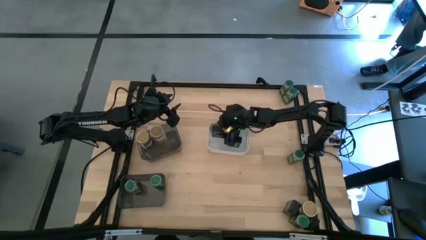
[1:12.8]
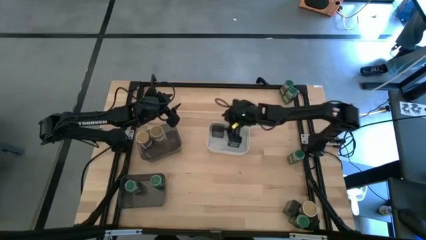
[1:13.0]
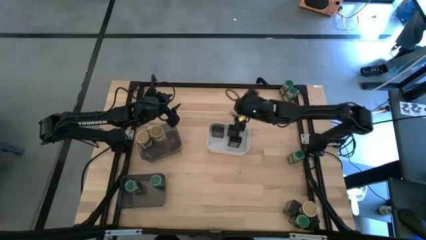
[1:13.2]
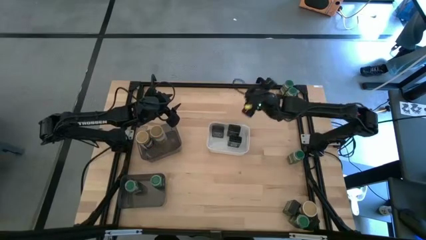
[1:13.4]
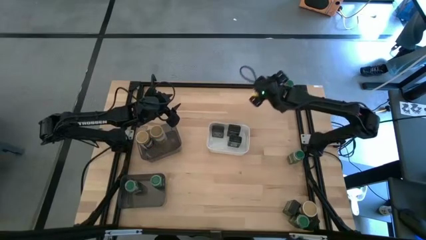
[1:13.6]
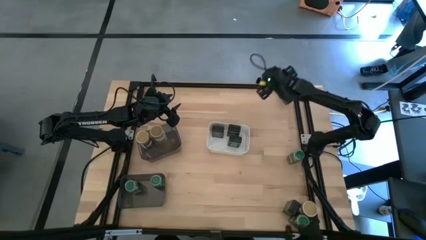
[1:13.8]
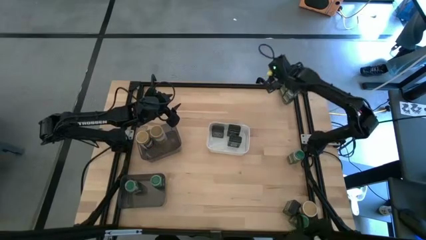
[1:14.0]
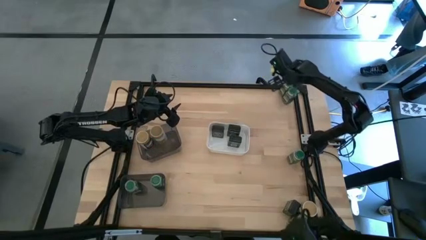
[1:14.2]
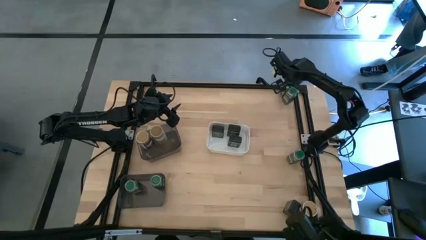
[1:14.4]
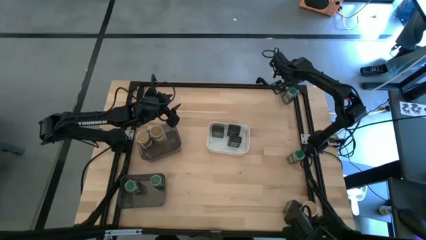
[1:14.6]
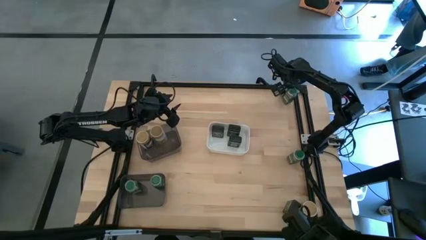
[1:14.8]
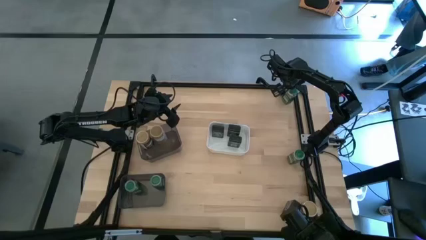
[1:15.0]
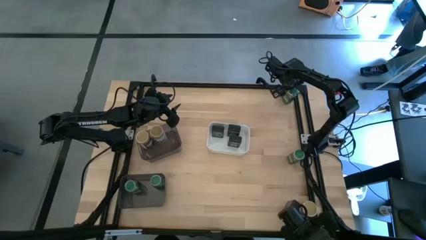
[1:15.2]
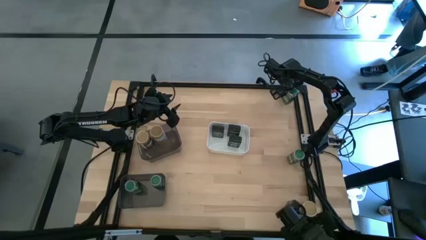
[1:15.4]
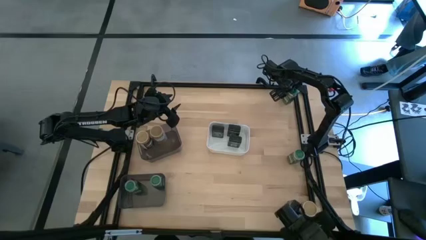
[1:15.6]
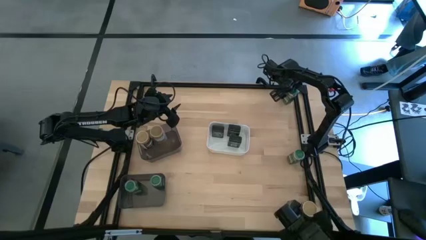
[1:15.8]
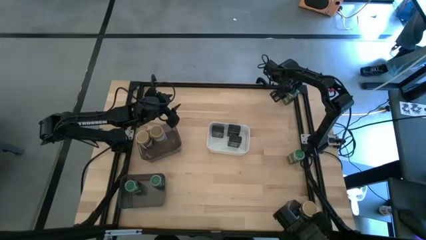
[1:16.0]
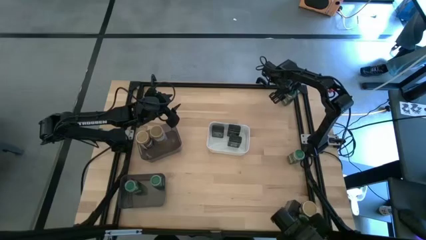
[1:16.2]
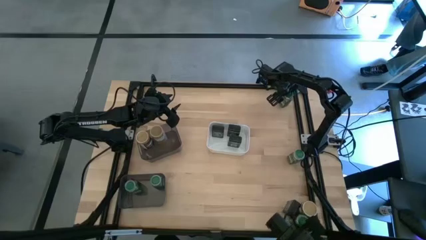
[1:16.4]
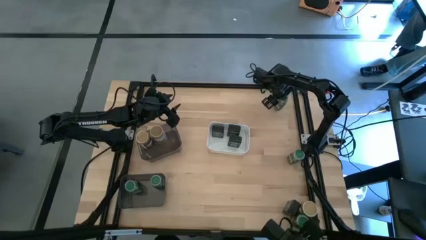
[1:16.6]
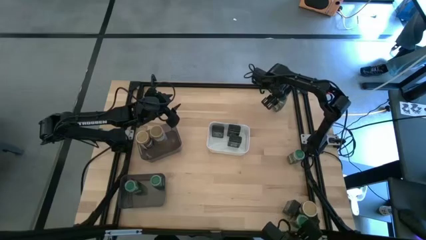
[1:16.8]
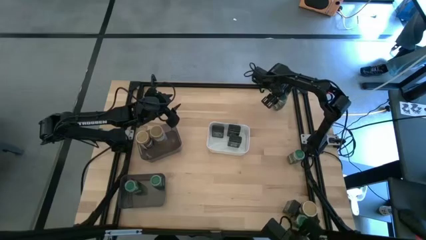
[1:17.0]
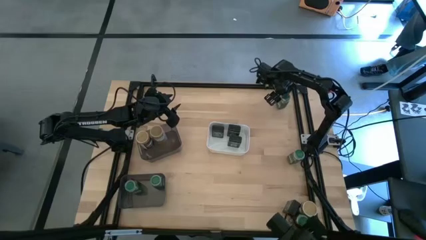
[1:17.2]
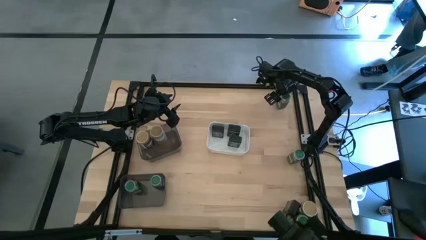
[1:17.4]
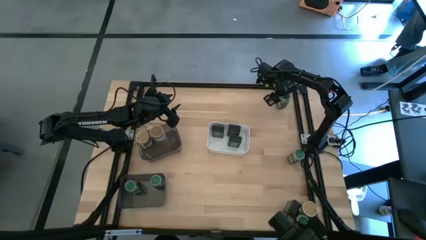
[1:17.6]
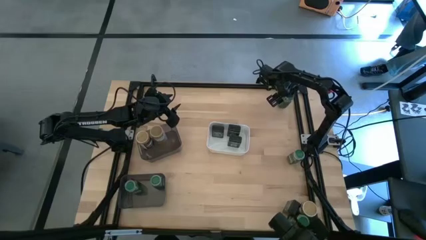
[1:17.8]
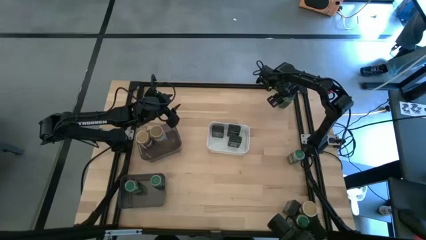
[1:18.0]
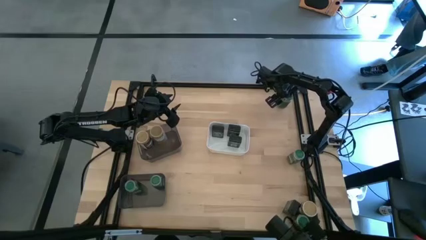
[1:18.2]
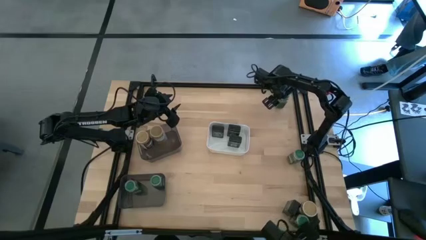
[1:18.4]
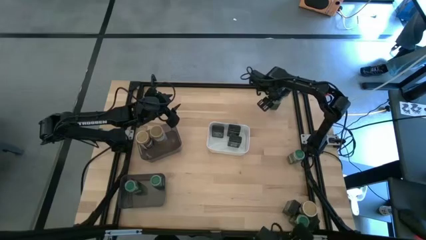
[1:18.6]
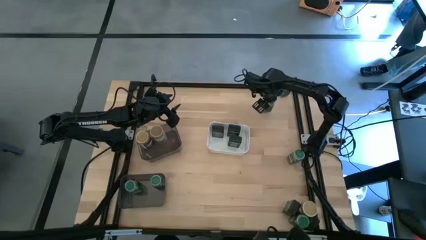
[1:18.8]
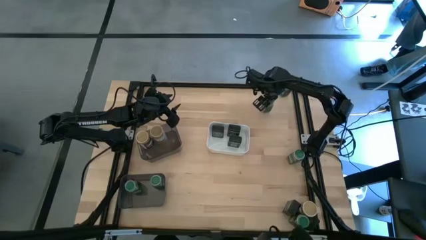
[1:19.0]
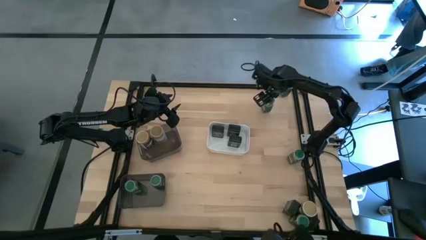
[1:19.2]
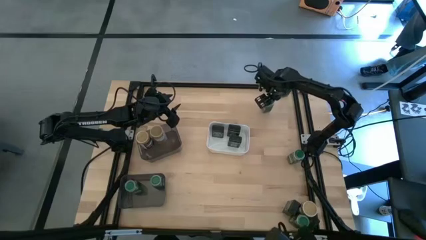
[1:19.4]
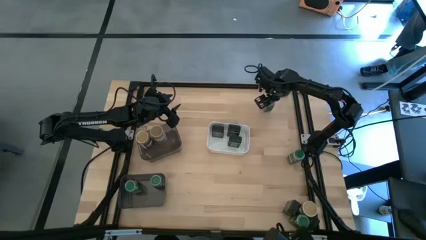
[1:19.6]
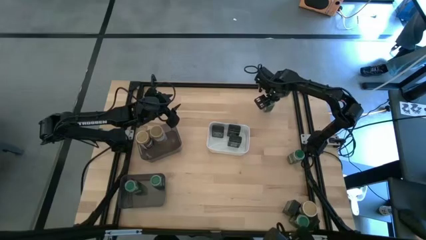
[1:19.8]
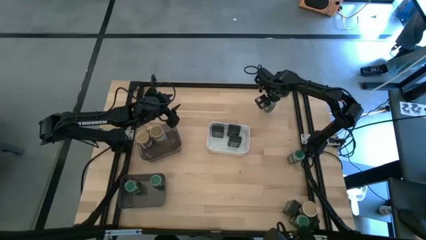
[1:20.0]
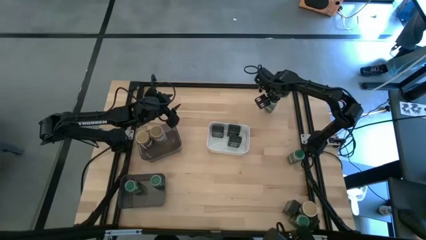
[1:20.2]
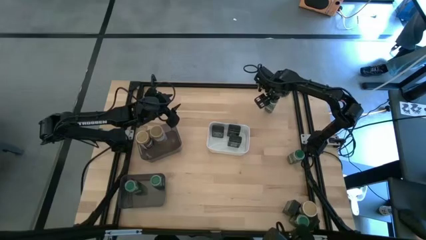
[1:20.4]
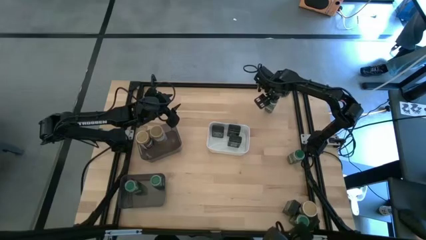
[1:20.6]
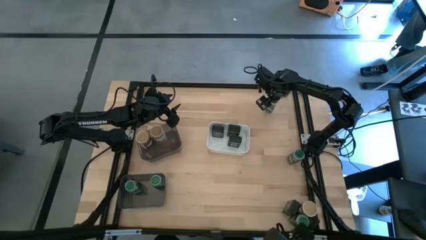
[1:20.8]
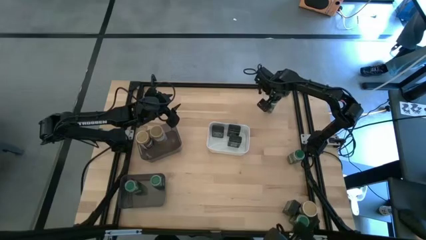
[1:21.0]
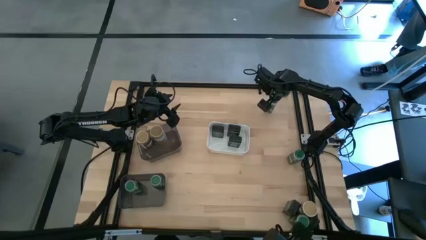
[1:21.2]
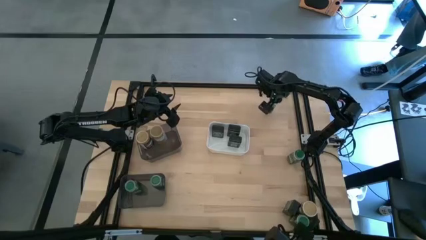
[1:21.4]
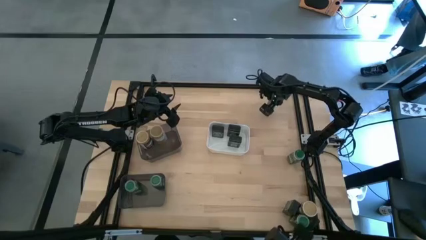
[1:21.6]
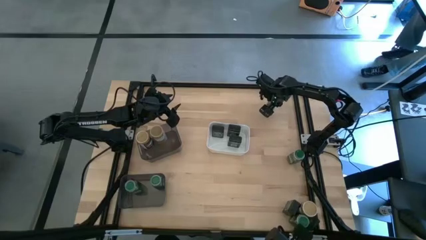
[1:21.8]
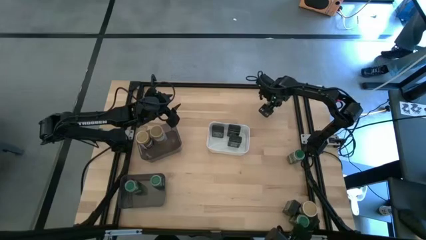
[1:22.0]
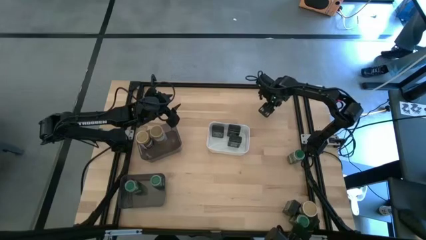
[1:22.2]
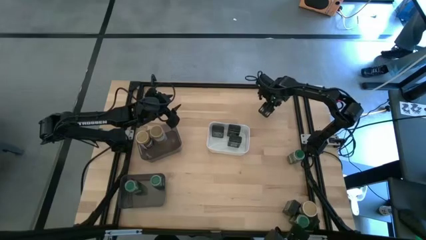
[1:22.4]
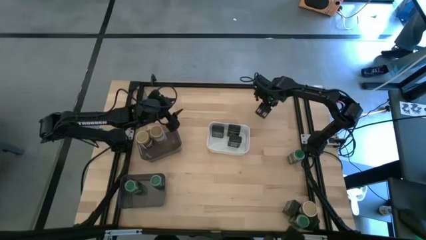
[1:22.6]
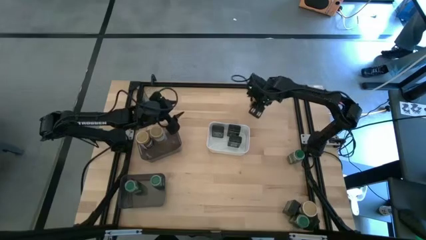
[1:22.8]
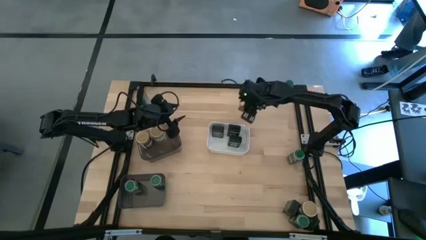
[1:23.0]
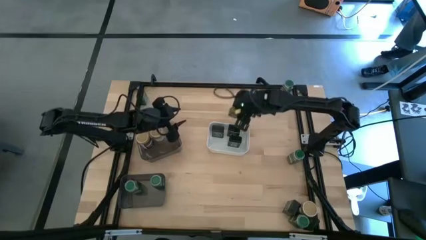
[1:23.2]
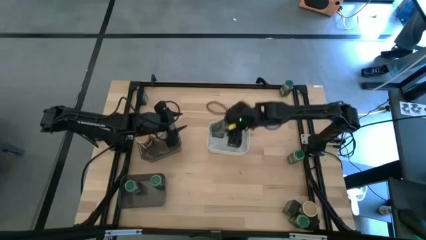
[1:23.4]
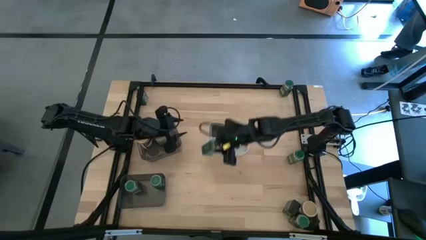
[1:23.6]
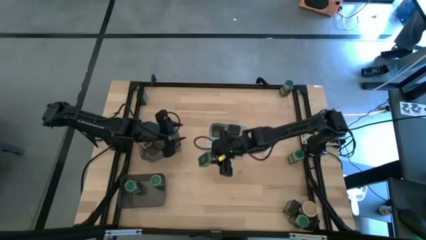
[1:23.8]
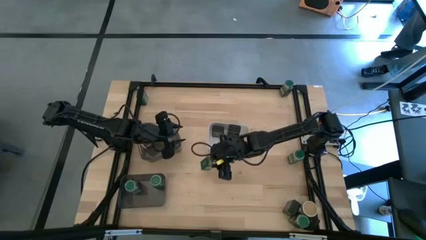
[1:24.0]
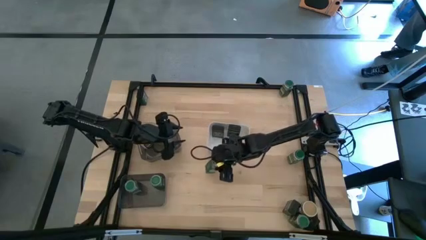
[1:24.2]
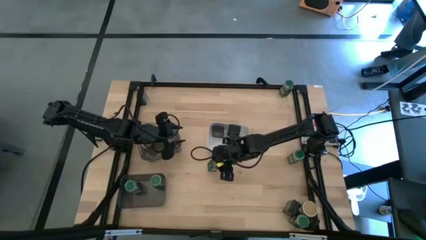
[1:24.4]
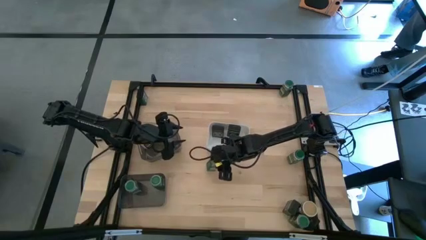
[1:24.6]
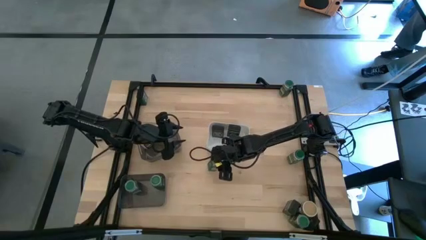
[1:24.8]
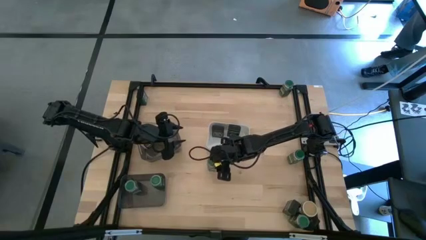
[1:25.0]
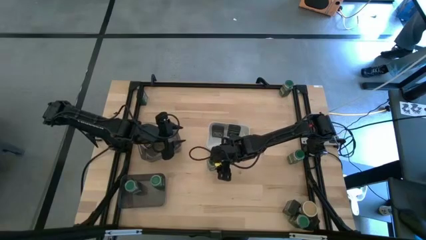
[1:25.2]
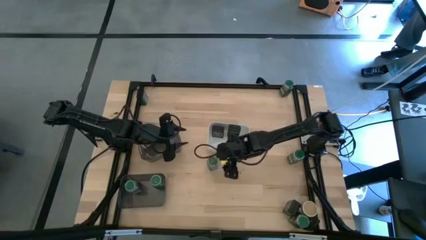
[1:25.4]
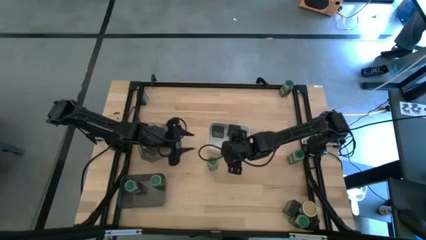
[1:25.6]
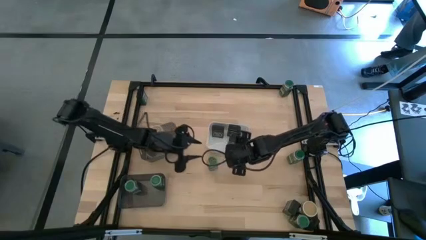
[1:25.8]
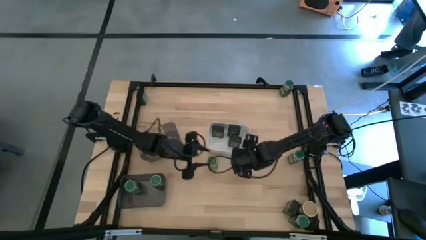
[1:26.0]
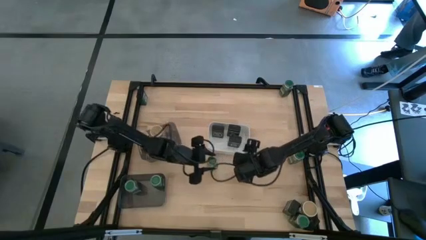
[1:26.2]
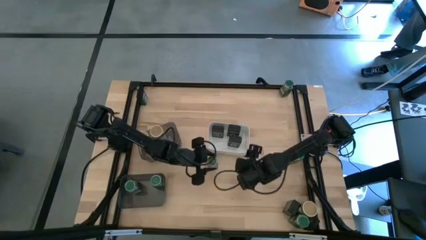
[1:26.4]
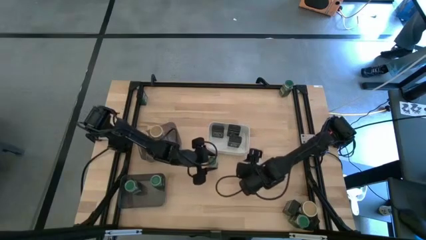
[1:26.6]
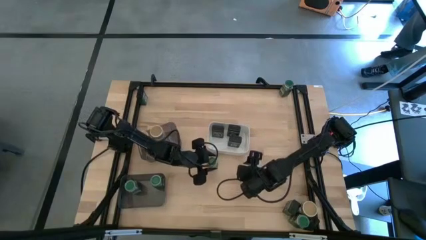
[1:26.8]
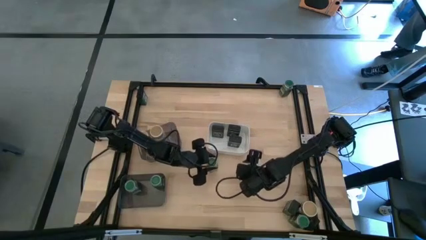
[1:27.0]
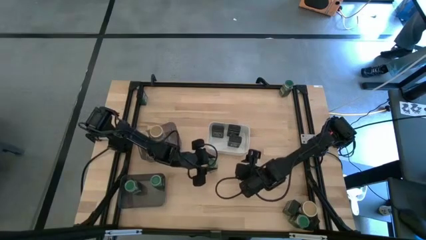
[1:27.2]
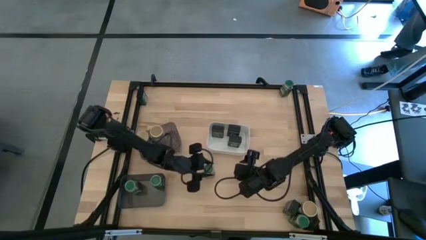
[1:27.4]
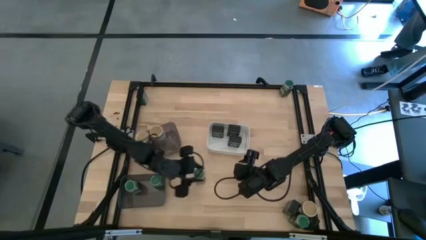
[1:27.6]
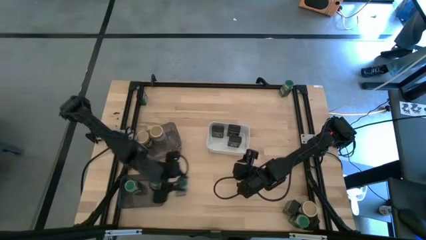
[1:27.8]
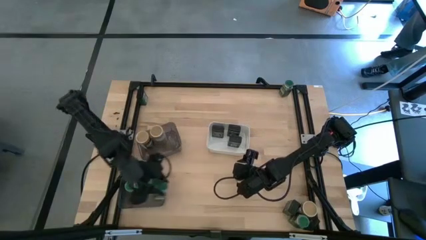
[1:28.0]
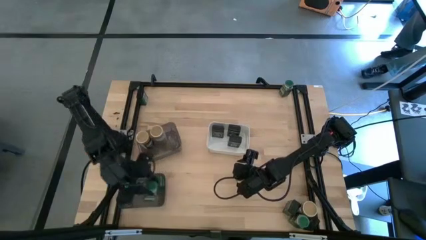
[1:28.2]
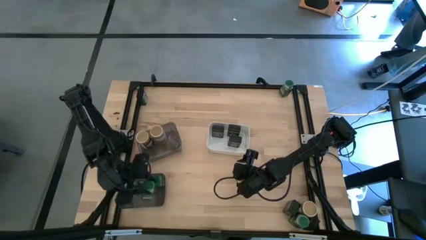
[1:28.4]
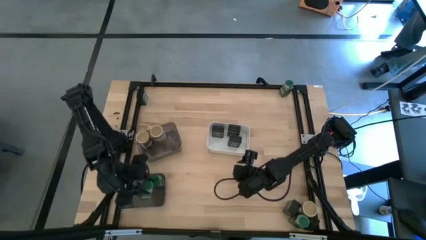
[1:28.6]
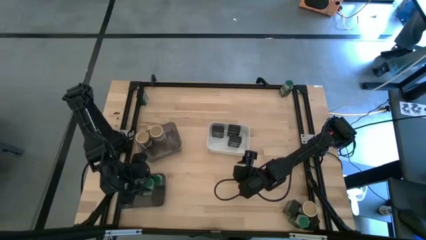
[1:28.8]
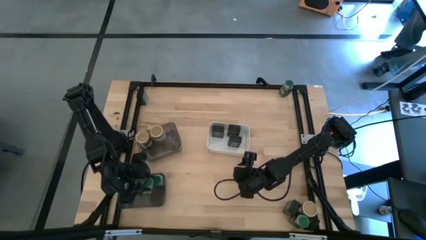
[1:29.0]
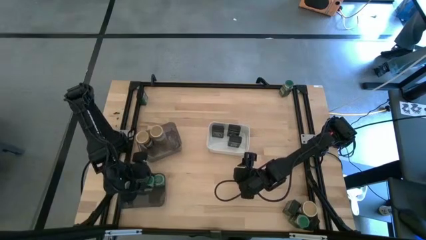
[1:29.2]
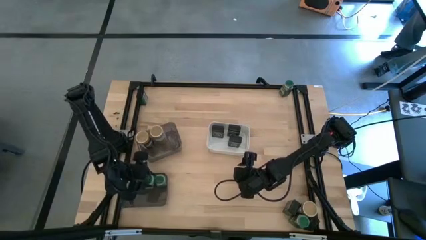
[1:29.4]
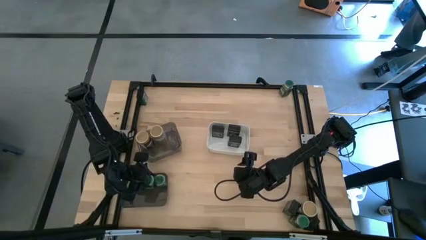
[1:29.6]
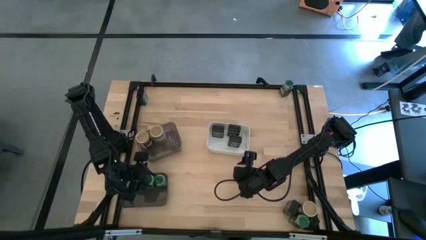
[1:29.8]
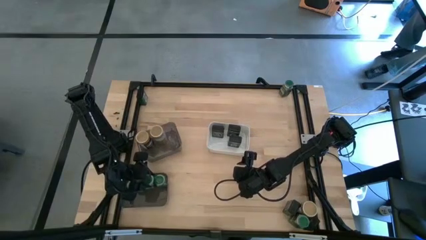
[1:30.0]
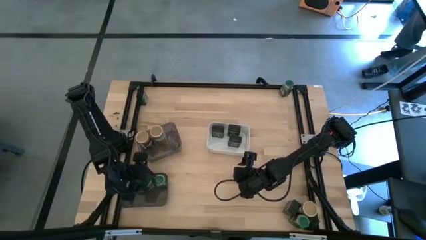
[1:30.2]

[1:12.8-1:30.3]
Task: Sort spices by type
Put the green seasoning bottle into the bottom black bin
